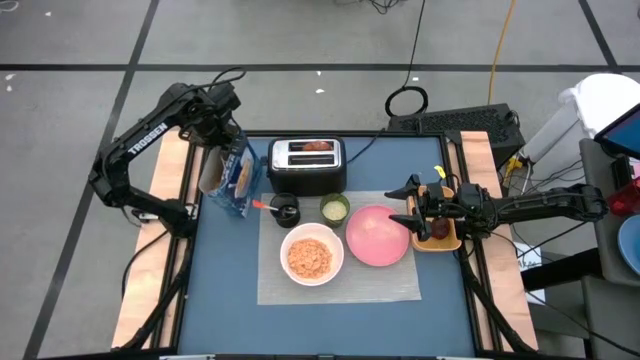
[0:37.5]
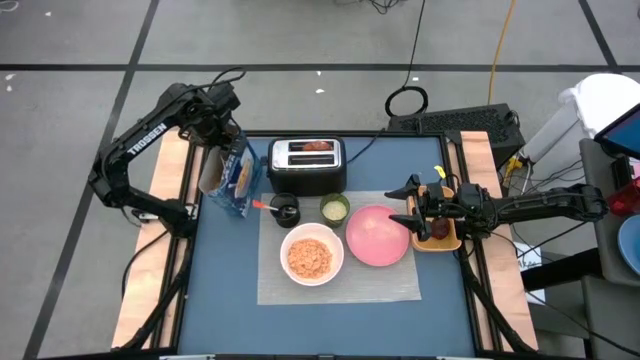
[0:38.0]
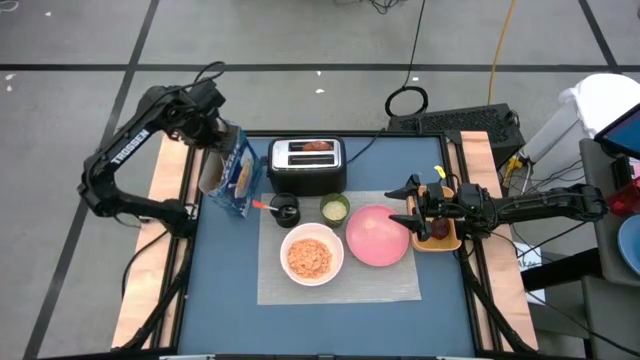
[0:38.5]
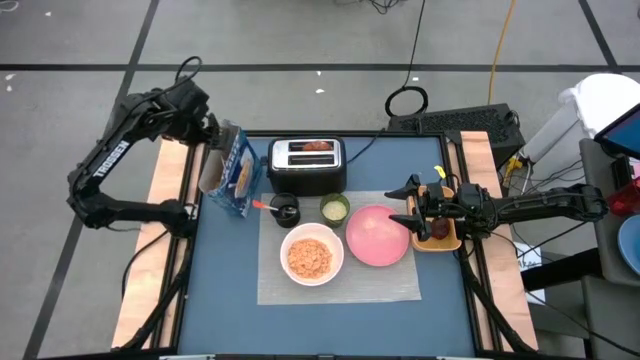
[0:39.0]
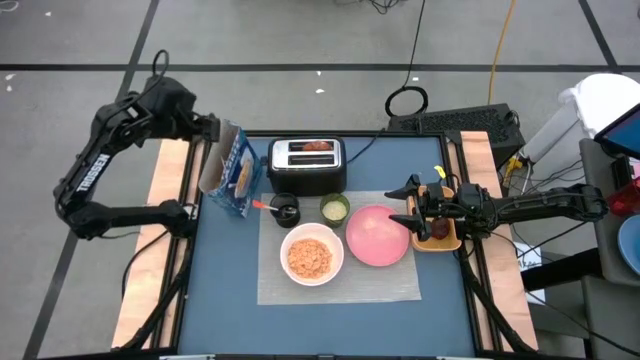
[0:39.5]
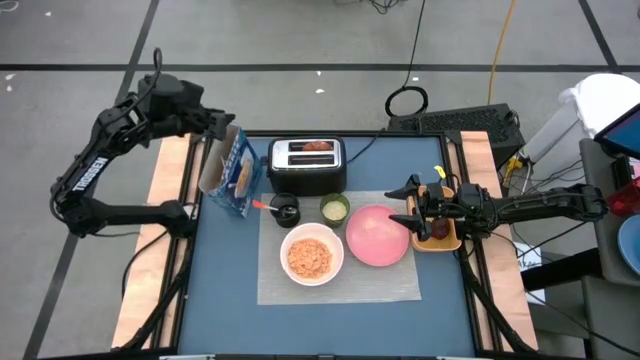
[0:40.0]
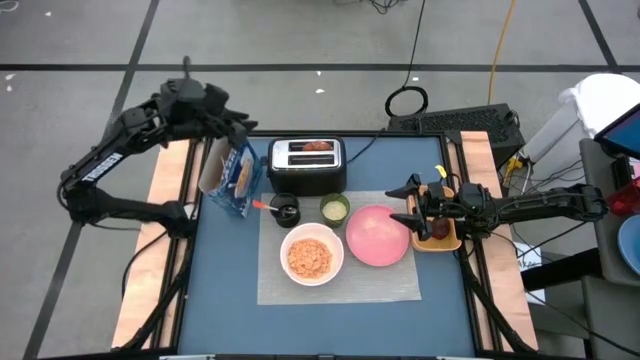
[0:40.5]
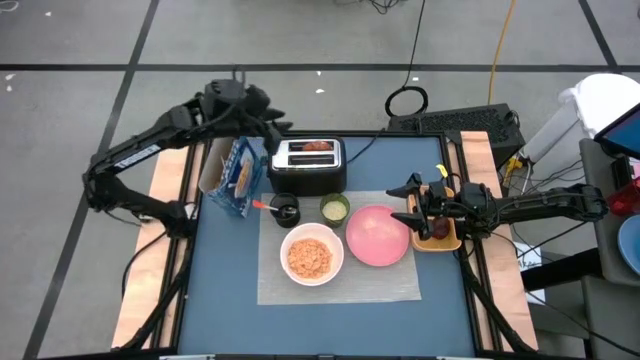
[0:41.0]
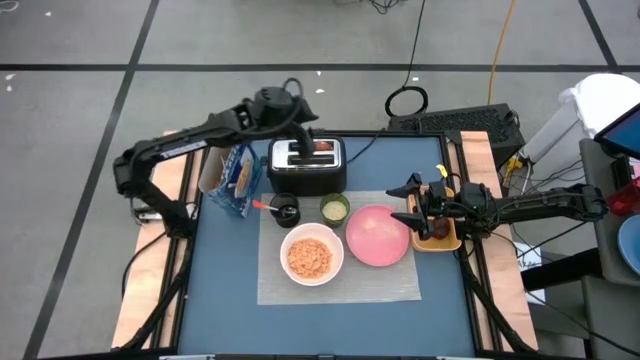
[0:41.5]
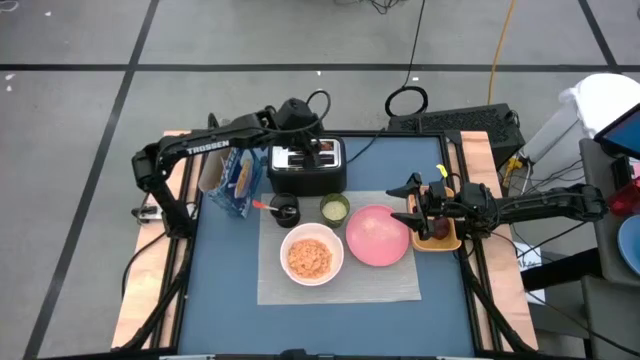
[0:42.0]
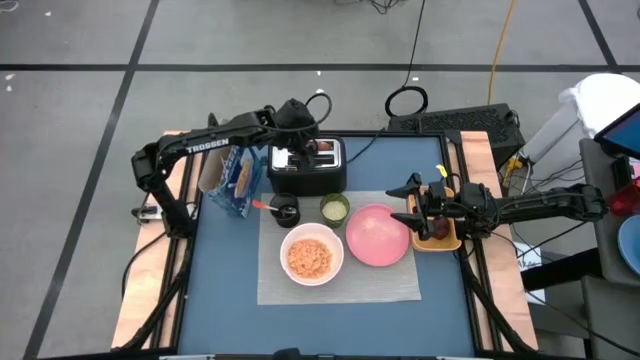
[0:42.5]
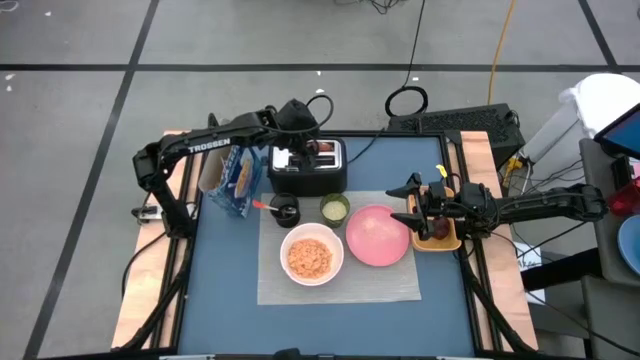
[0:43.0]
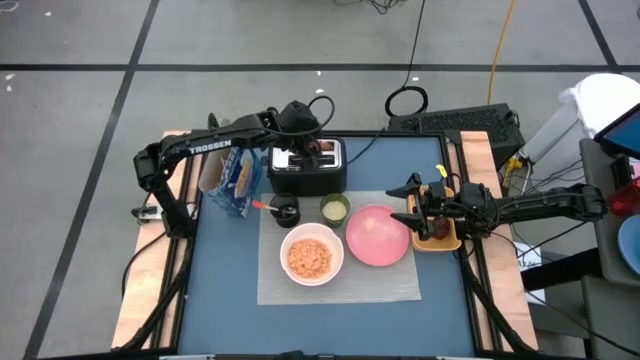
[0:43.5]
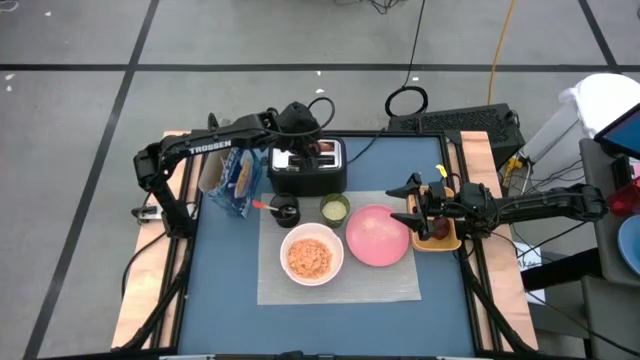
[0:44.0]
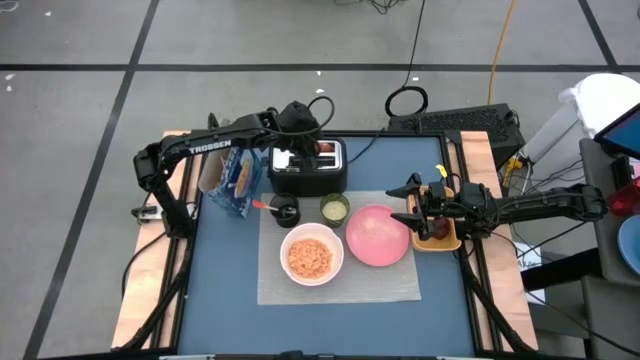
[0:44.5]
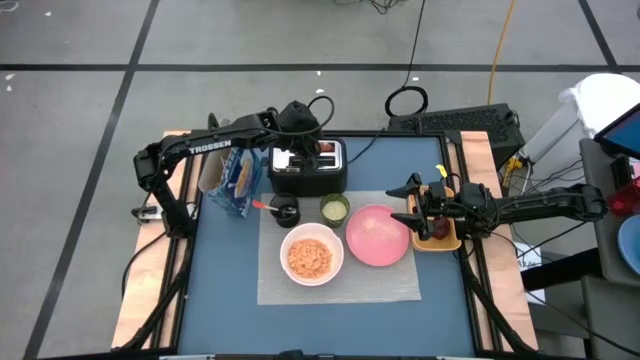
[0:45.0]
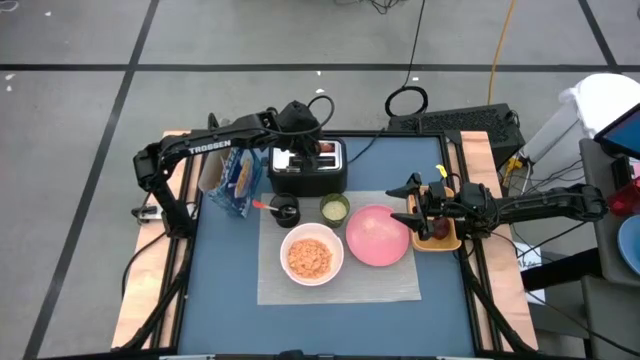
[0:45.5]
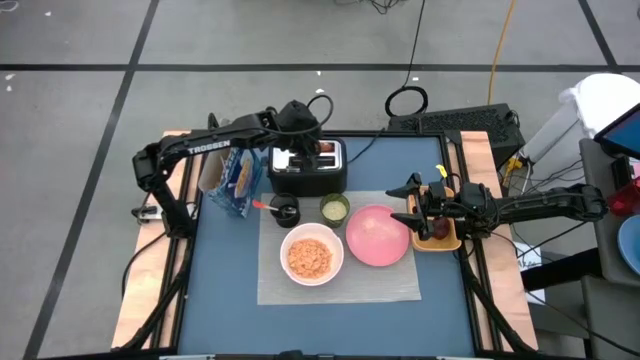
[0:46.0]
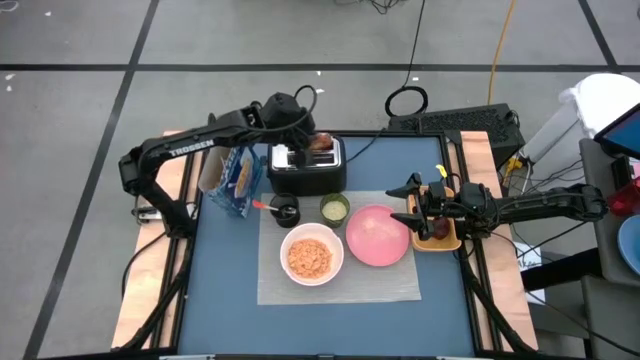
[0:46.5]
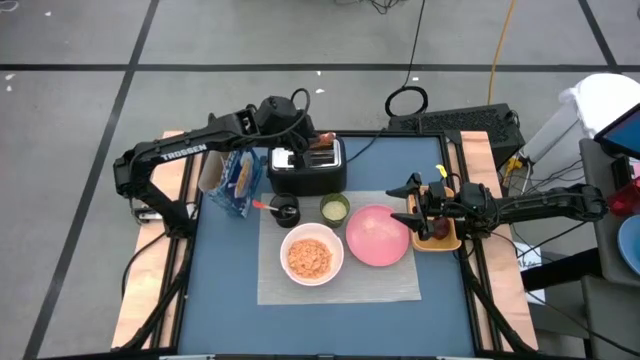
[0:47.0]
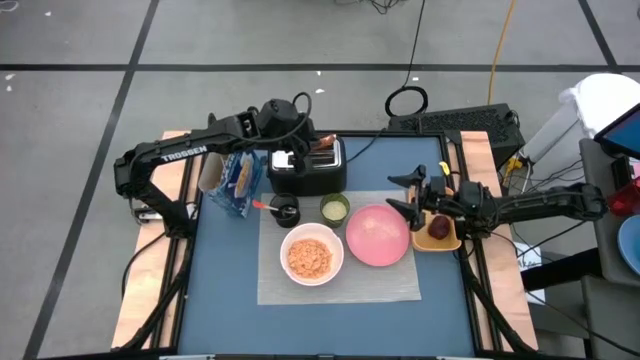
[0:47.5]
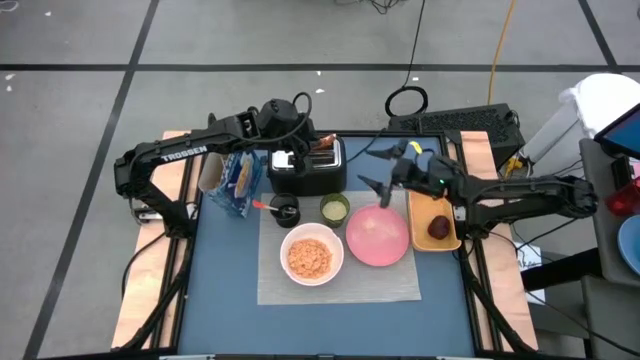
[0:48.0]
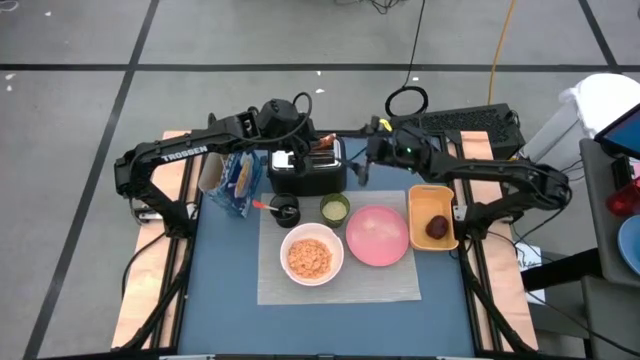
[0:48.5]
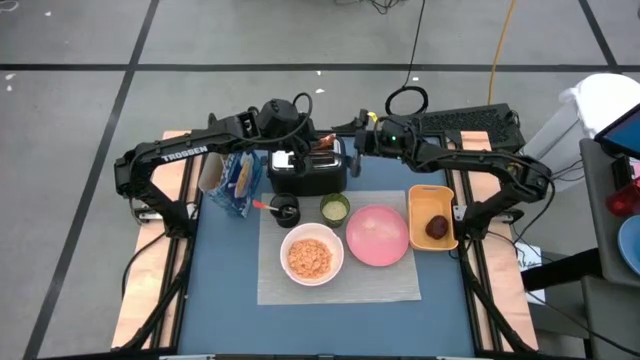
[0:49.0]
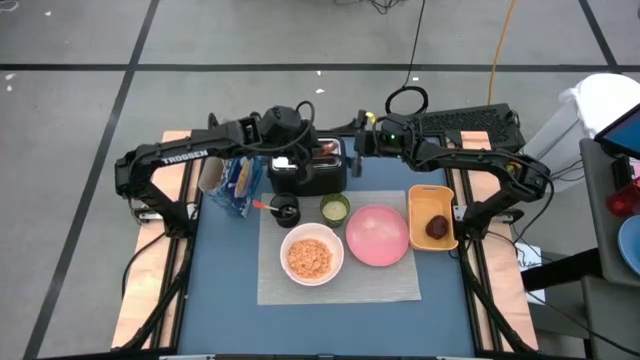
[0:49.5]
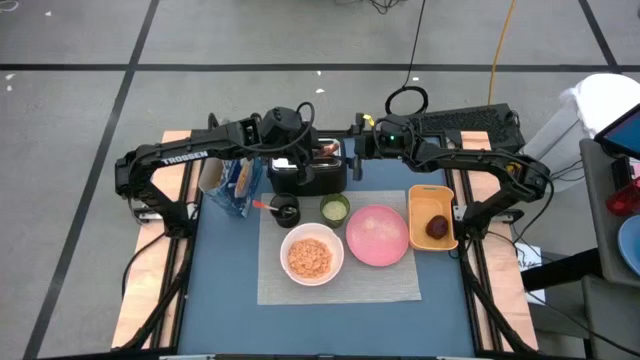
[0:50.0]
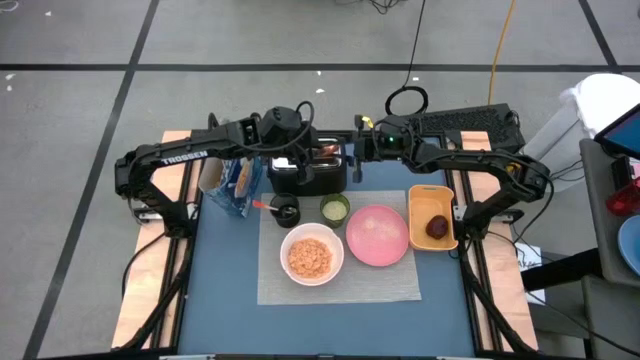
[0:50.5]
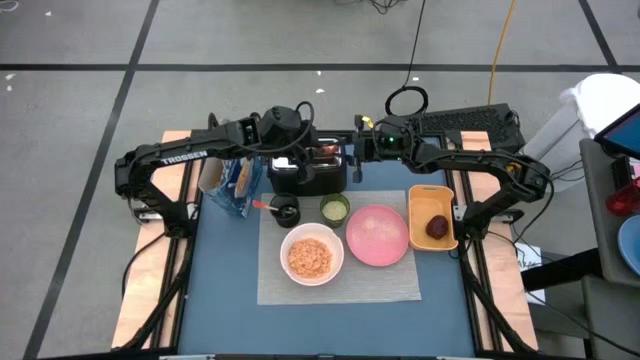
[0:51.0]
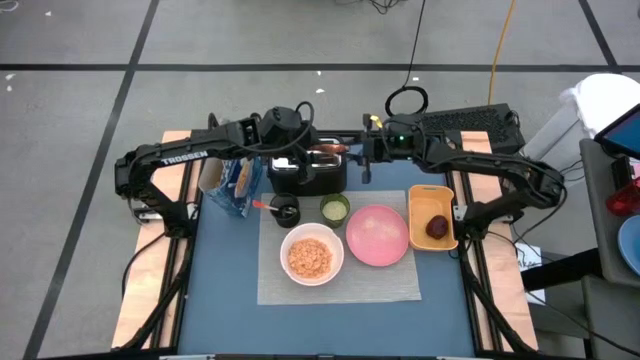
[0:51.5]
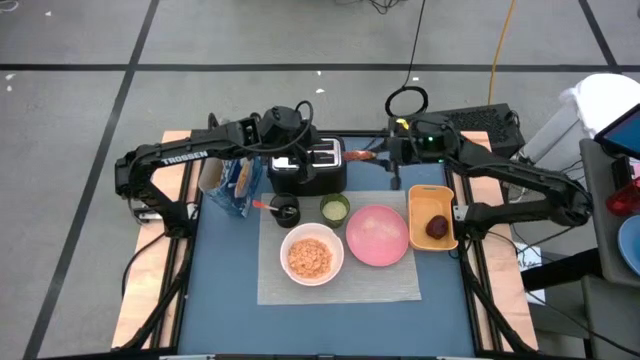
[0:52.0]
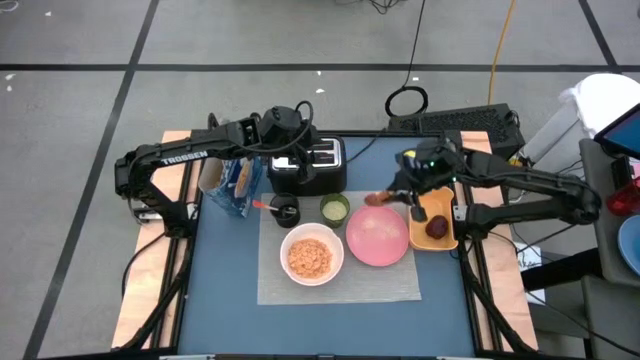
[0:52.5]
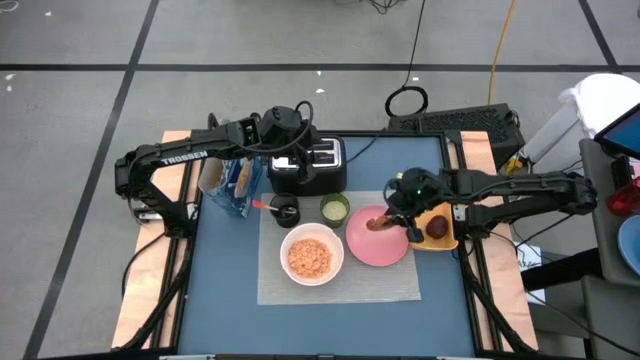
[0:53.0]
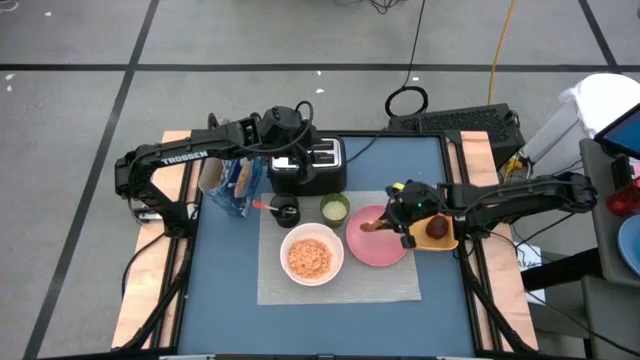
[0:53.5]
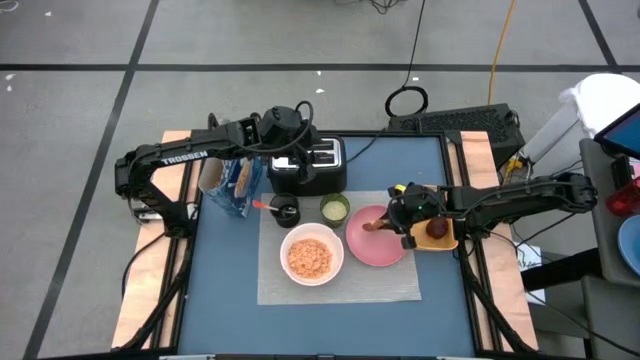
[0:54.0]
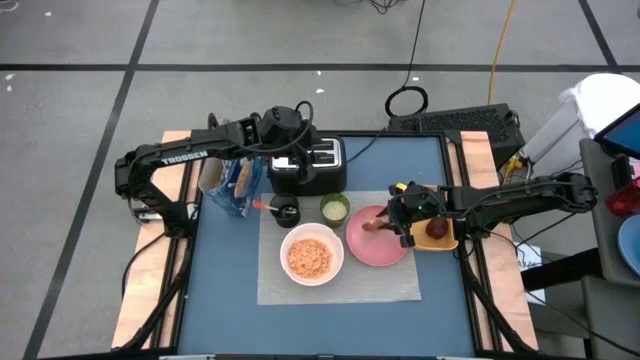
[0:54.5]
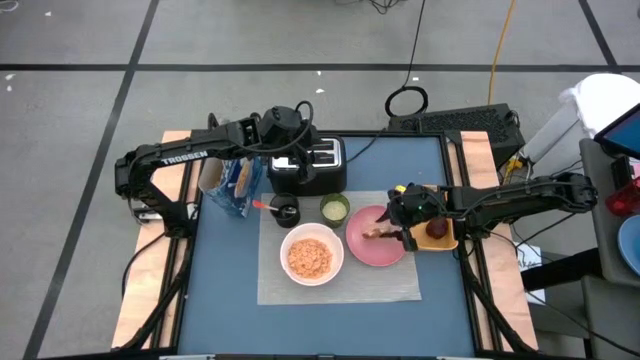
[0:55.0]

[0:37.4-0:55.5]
Task: Arrange a breakfast setting
Put the bagel on the pink plate

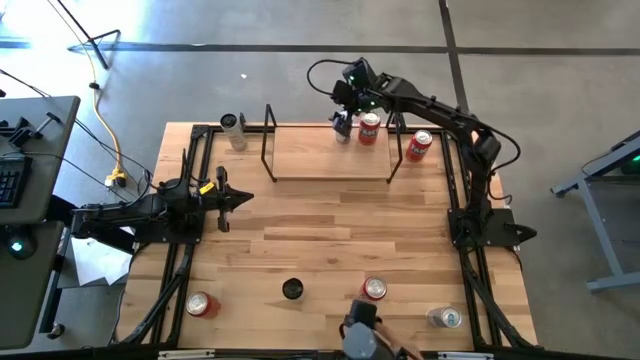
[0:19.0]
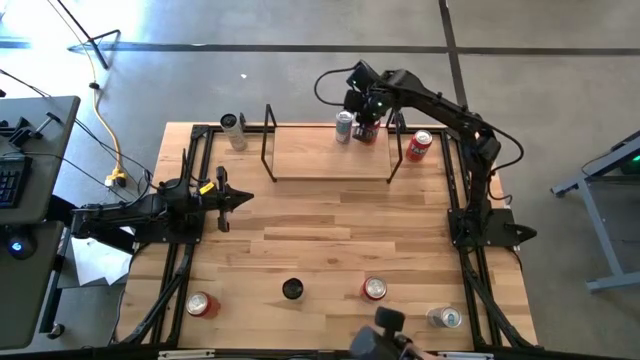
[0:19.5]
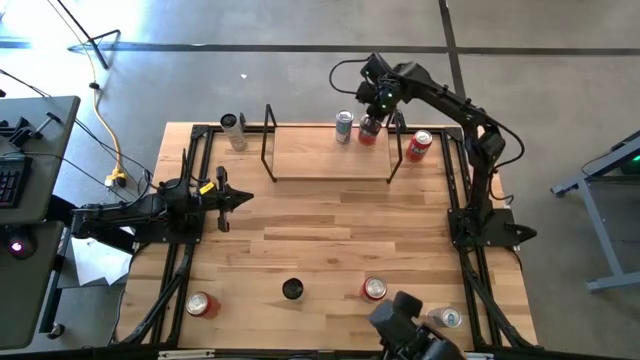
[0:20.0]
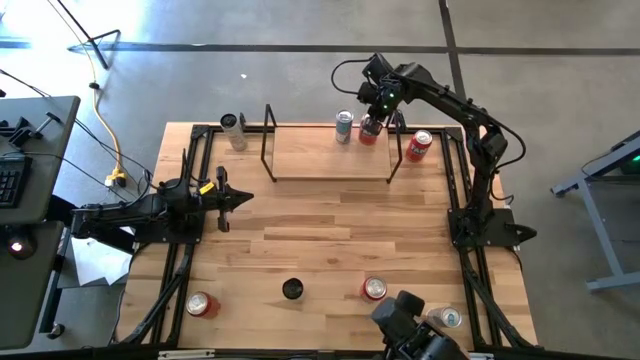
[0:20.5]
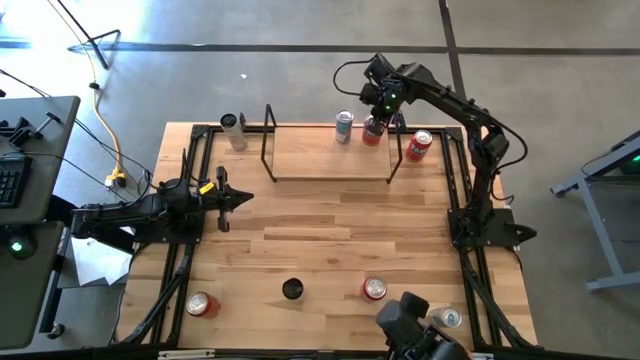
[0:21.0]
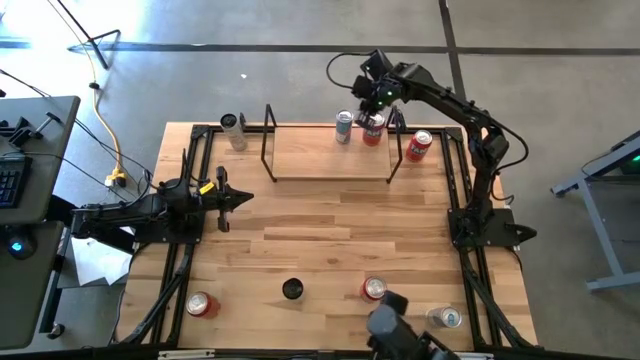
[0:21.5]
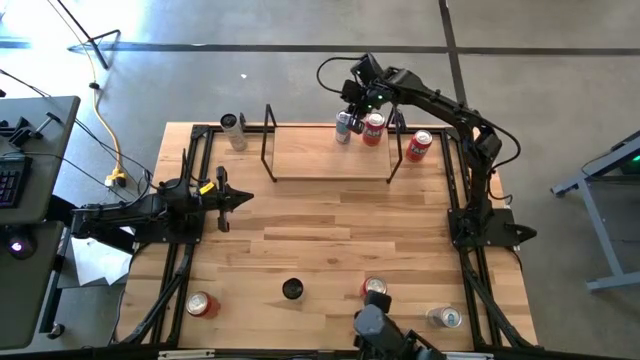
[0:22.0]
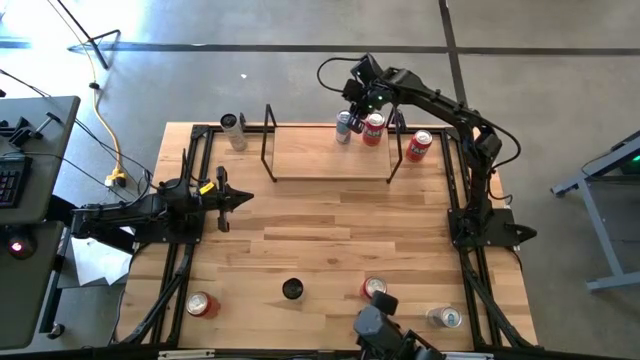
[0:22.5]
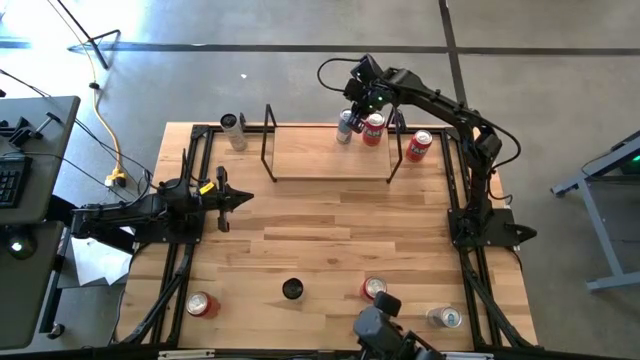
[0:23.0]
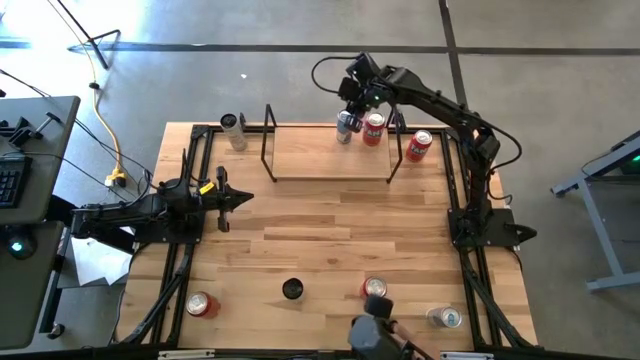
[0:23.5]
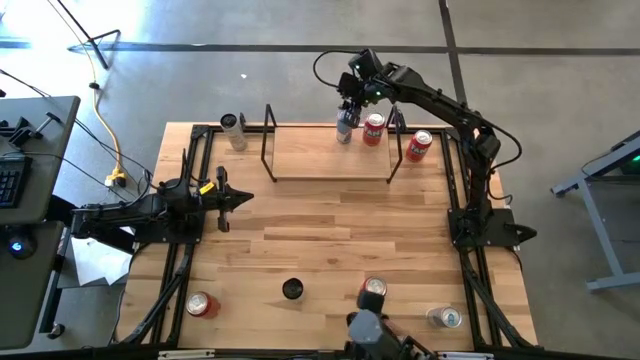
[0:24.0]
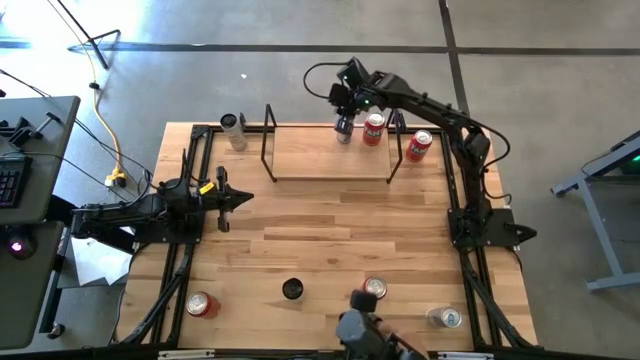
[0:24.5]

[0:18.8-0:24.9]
Task: Place canned beverage on shelf
Adjust the soda cans on the shelf
